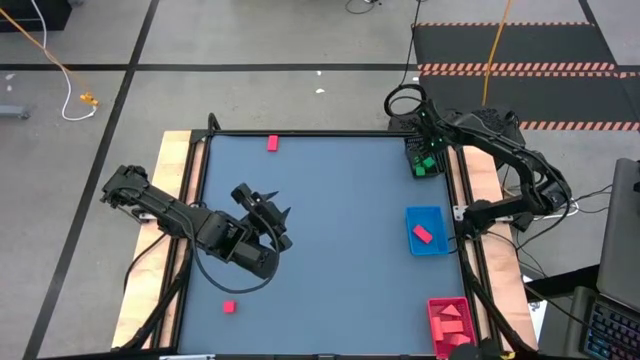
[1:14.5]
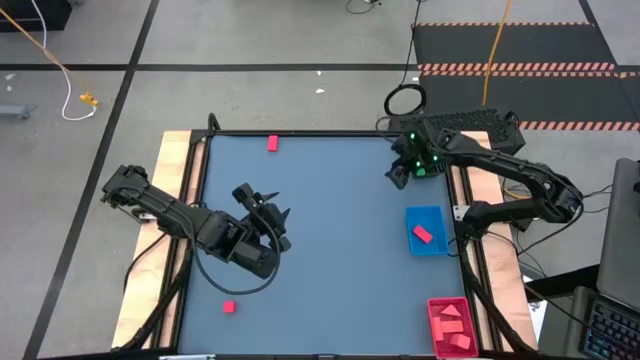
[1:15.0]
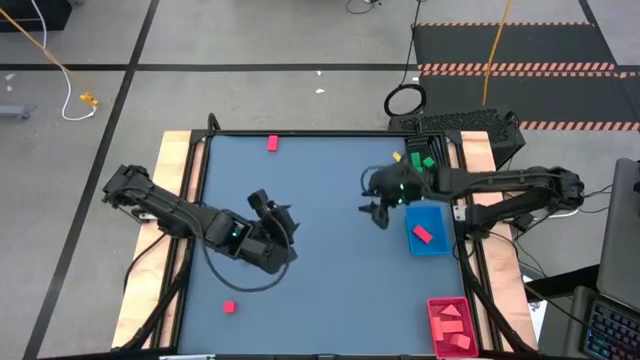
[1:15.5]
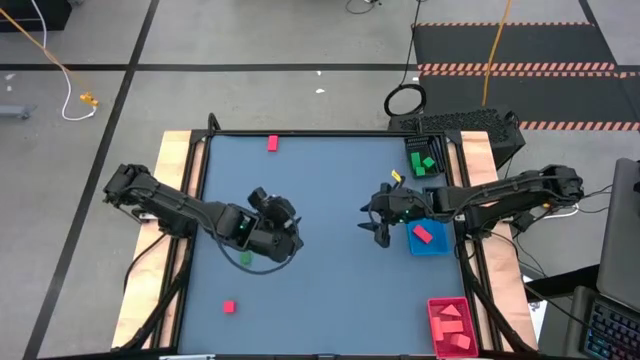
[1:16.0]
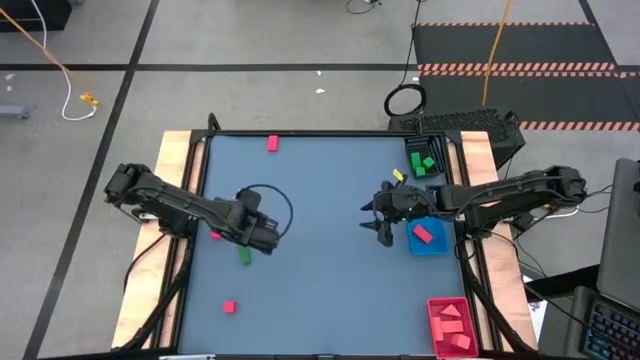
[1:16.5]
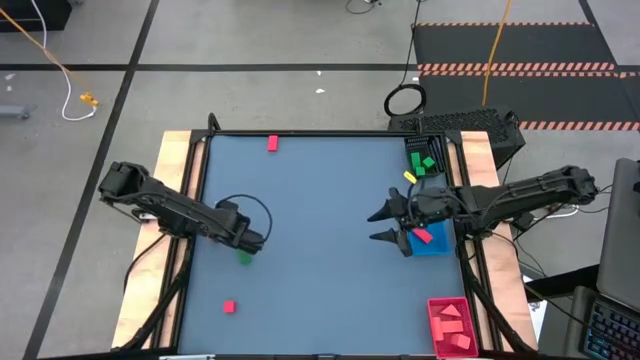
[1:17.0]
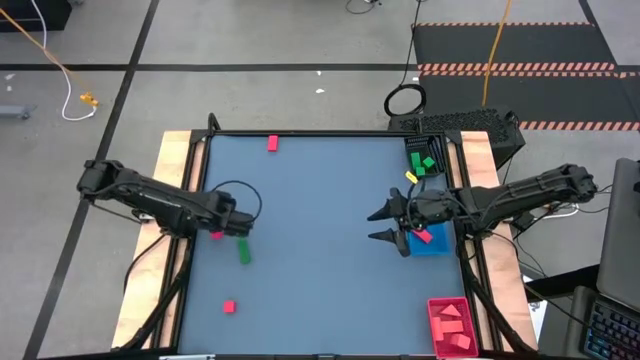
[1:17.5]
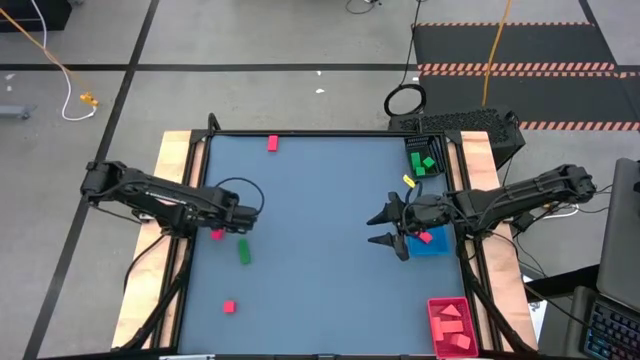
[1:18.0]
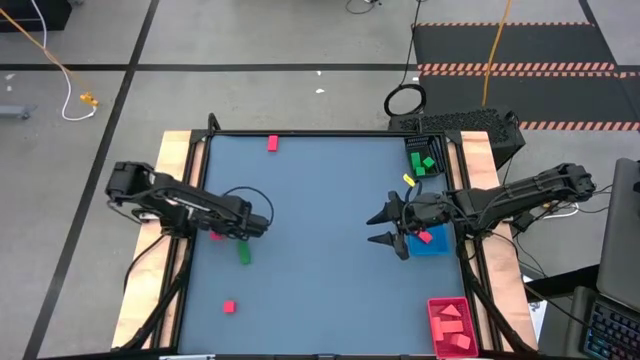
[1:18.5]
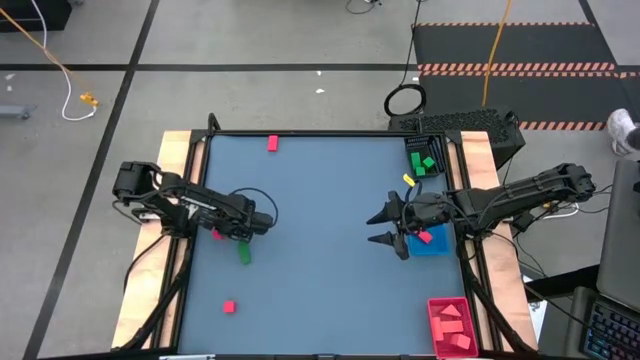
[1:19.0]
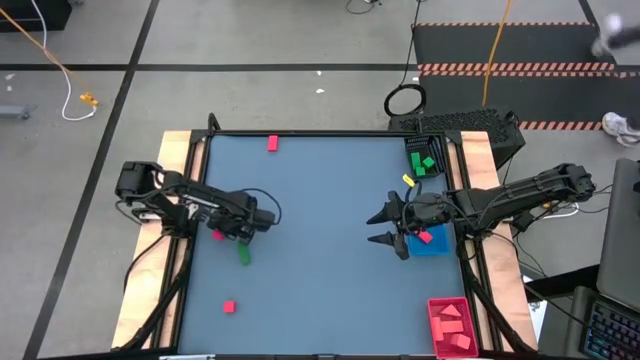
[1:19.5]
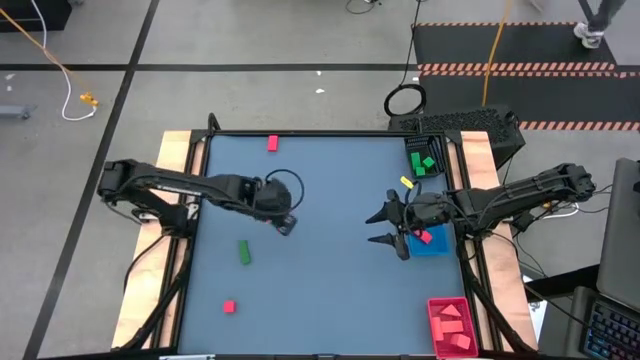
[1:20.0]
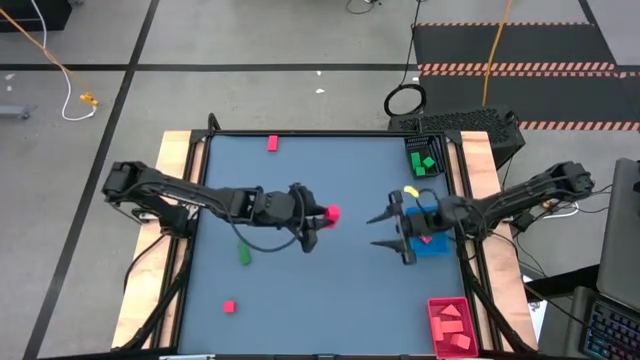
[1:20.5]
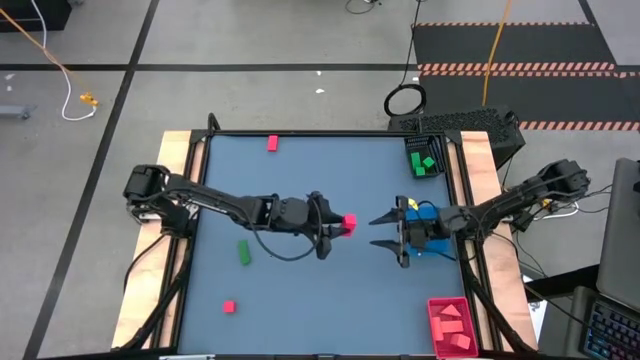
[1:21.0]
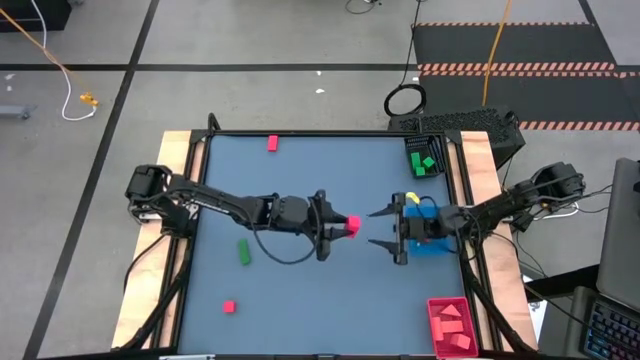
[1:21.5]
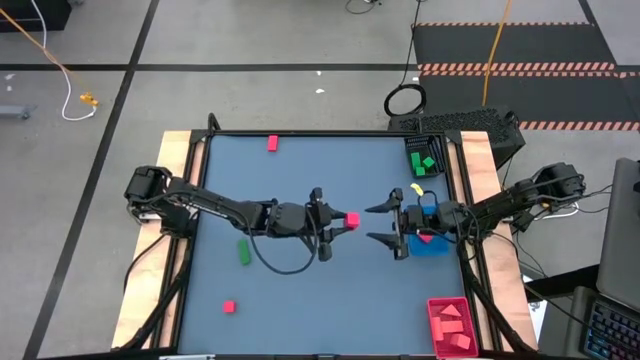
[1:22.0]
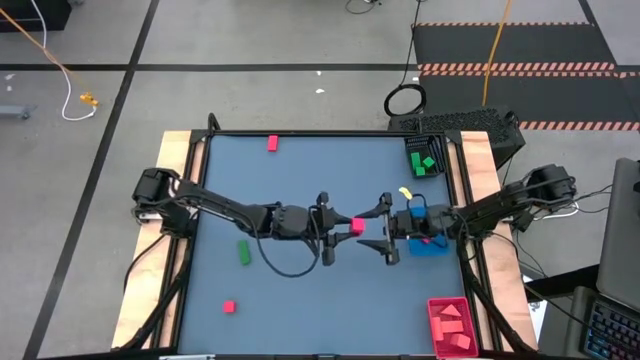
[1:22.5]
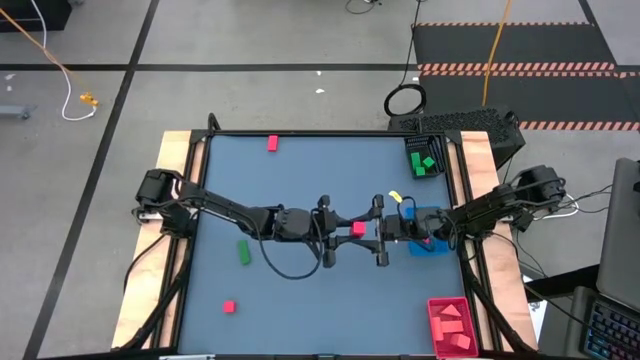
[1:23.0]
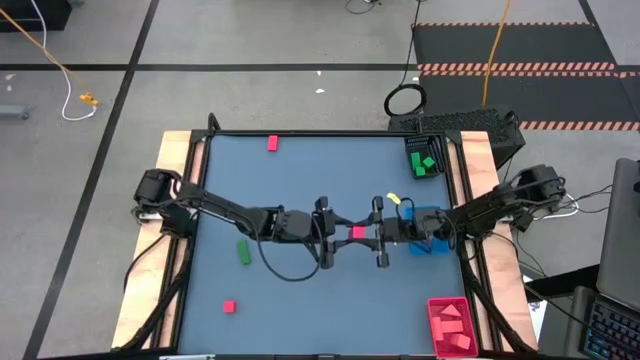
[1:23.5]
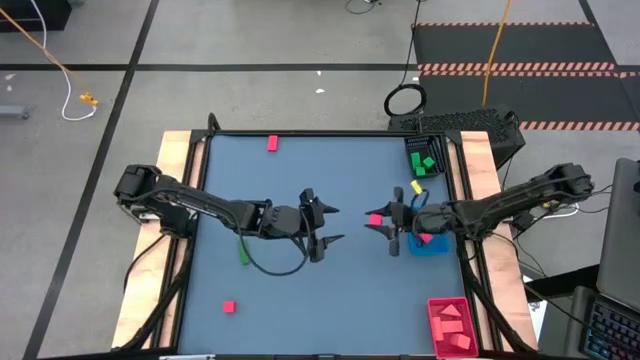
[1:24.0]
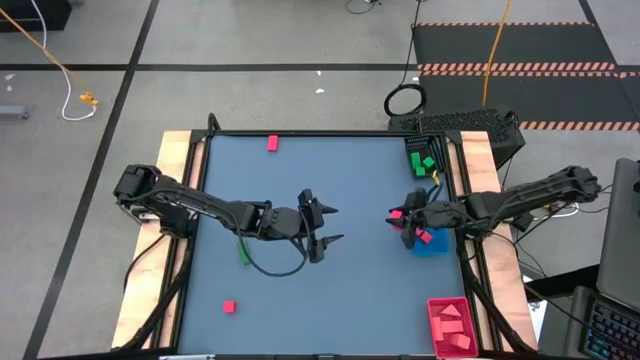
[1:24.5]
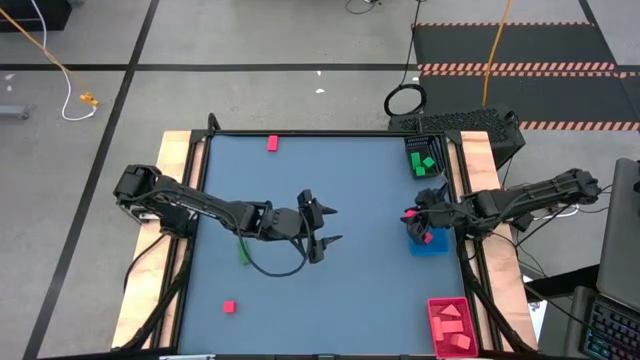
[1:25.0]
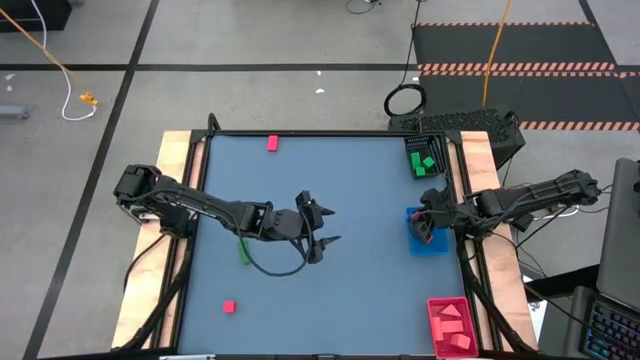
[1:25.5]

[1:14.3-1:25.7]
Task: Sort & place blocks by color
Put the red block into the blue bin

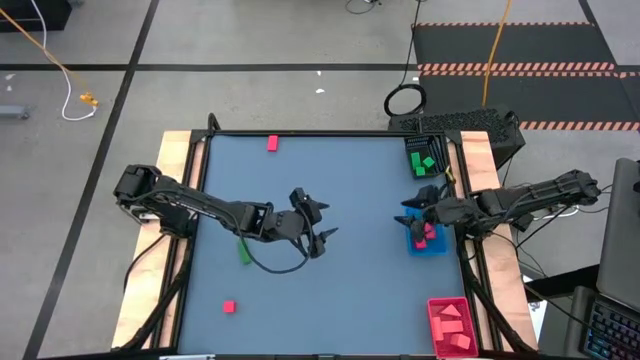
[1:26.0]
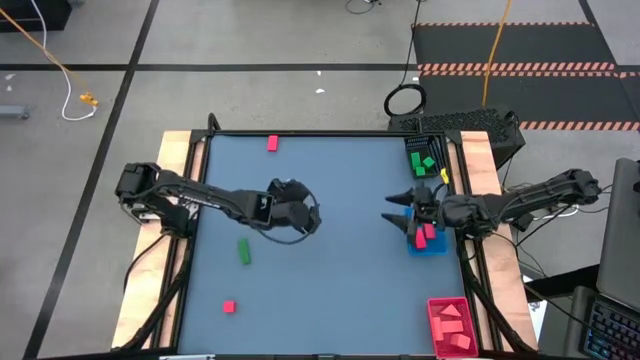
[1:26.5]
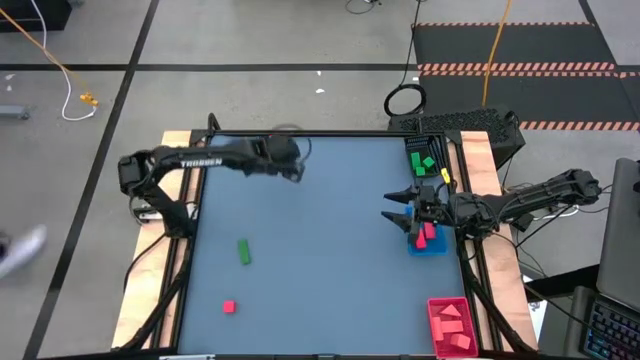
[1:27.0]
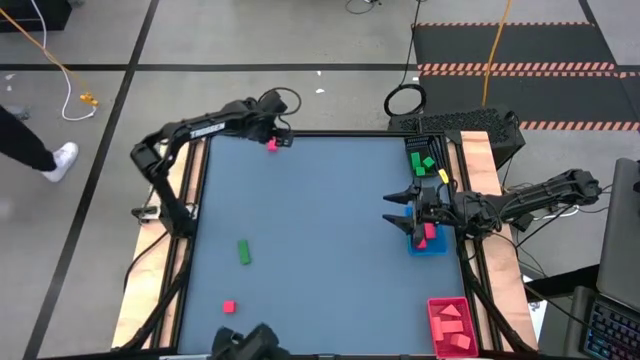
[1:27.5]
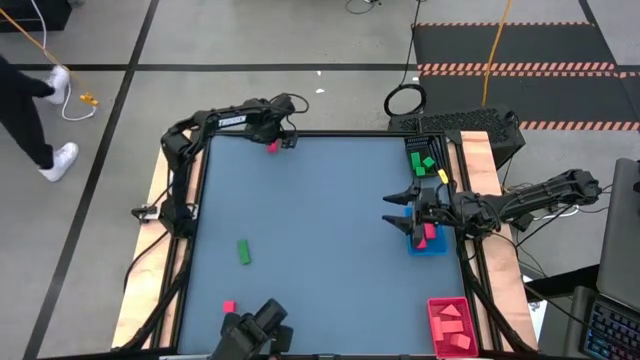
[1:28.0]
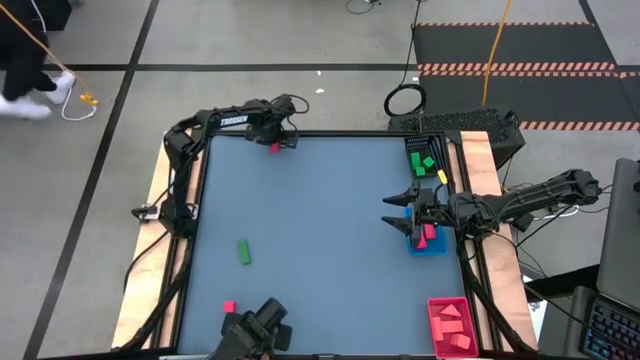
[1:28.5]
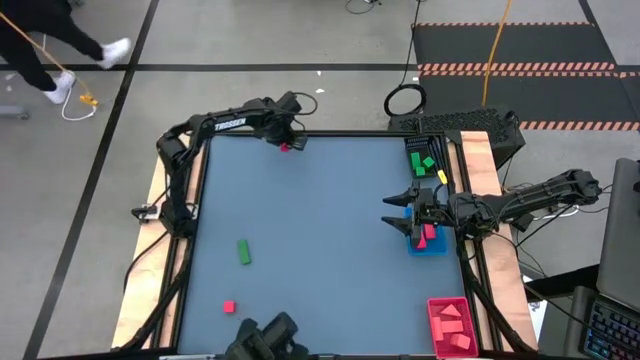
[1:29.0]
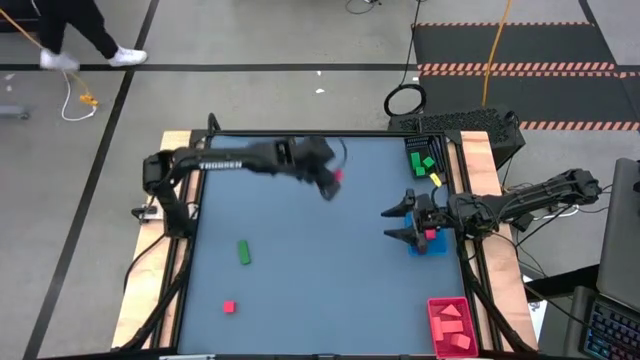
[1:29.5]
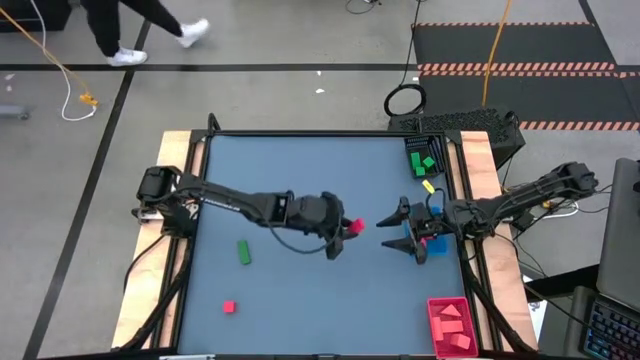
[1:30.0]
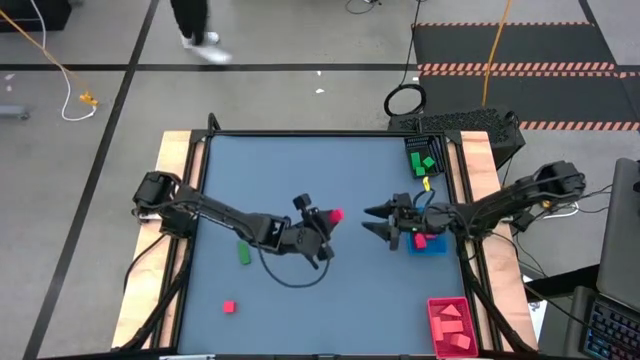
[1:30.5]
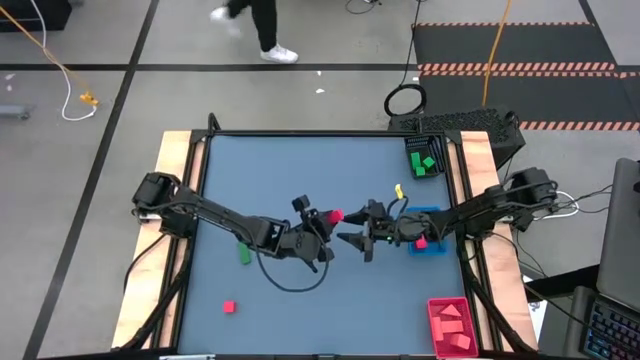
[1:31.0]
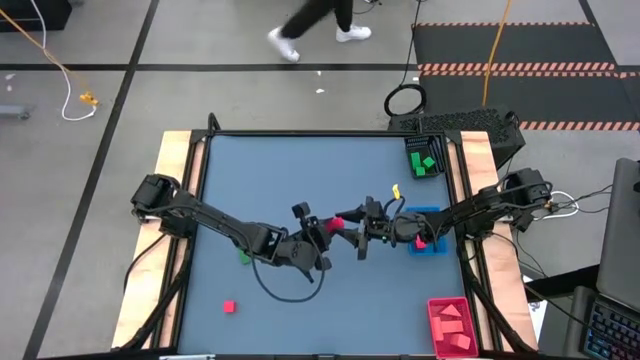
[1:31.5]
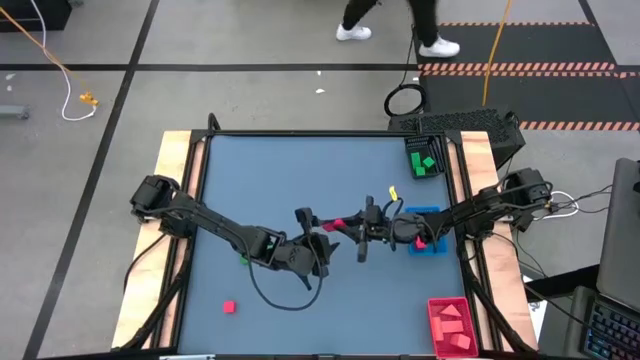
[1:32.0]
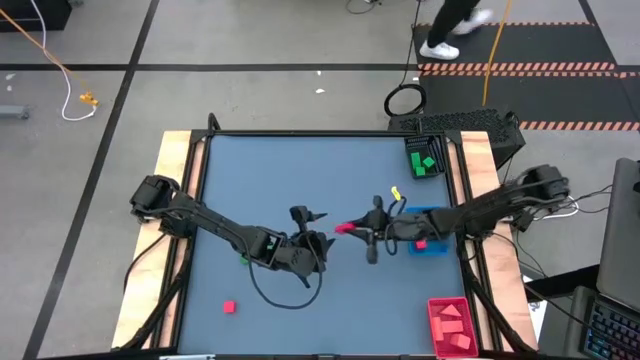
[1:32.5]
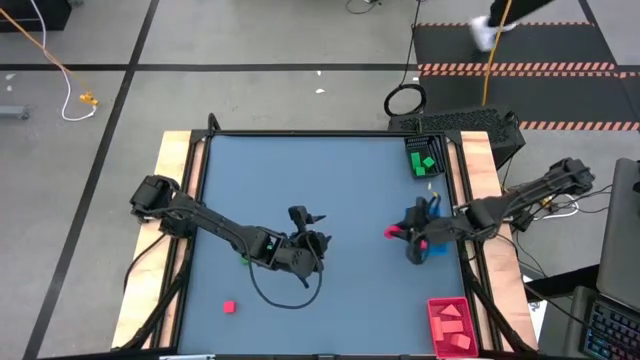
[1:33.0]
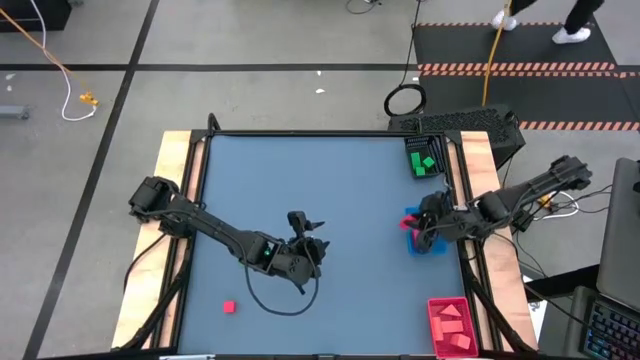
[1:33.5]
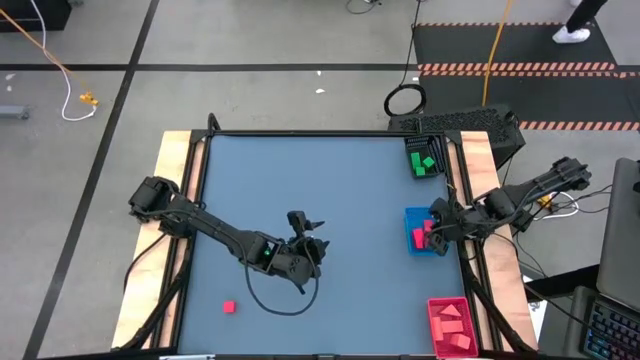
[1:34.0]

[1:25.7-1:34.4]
Put the red block into the blue bin

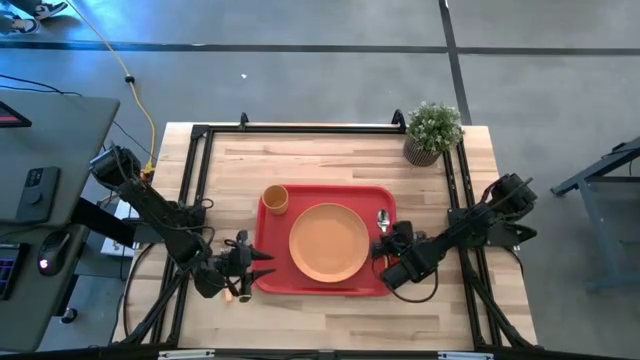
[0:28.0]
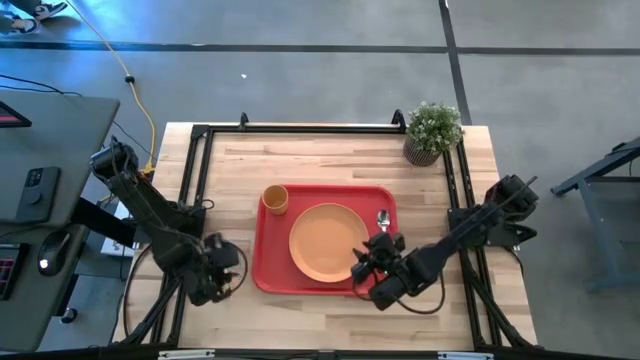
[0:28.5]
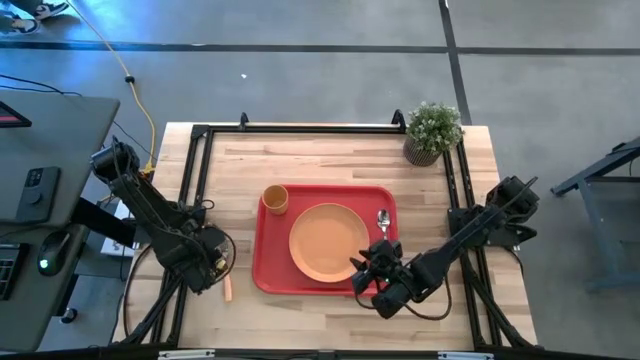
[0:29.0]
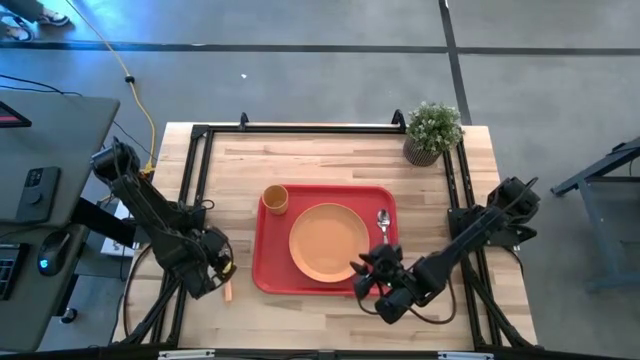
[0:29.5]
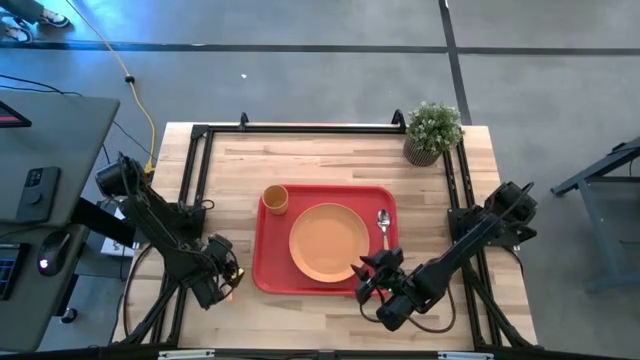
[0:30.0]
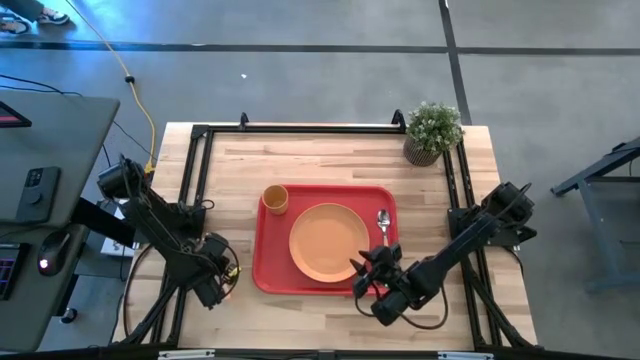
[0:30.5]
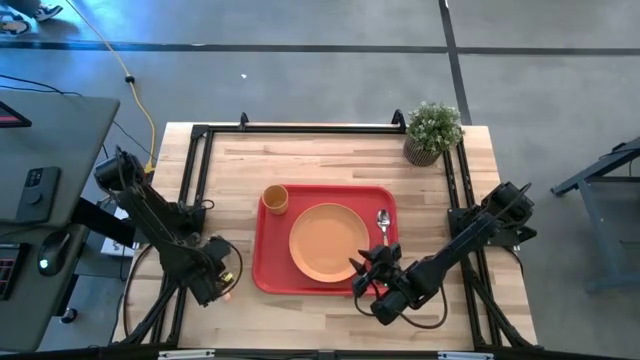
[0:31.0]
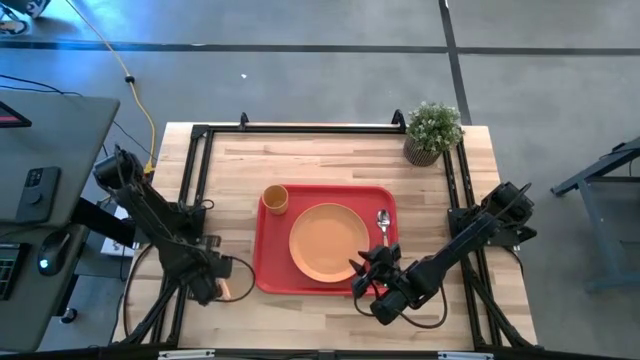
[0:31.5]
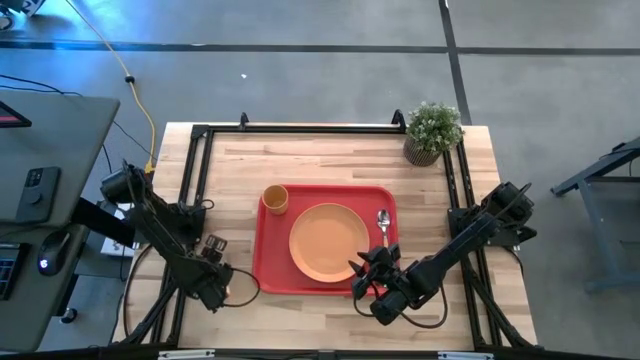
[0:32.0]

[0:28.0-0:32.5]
Task: Pick and place plate/cup/fork/spoon on tray
Put the orange fork on the red tray to the left of the orange spoon
